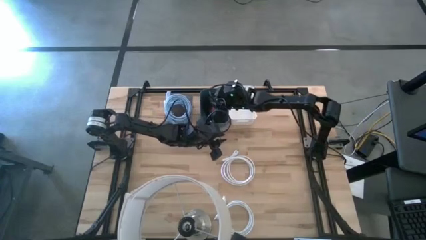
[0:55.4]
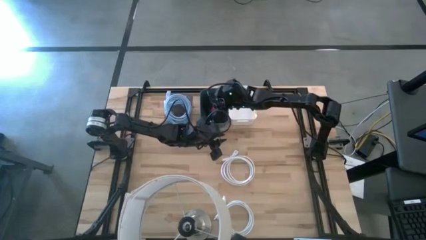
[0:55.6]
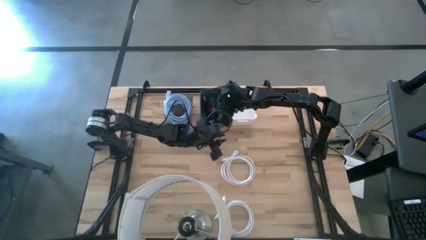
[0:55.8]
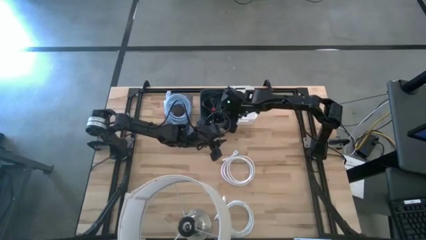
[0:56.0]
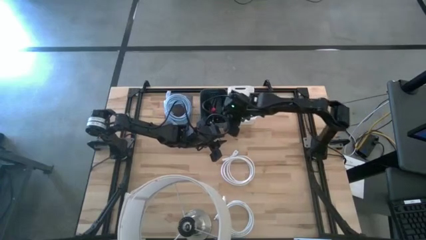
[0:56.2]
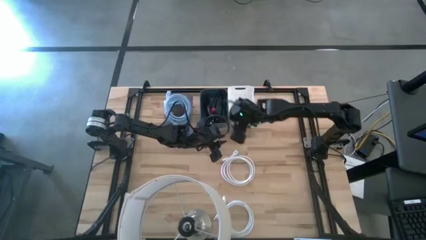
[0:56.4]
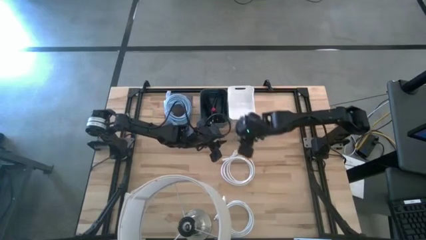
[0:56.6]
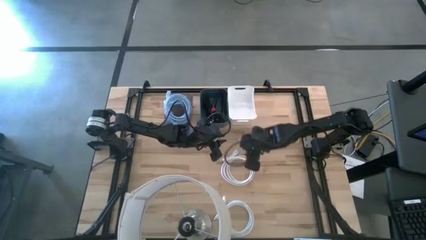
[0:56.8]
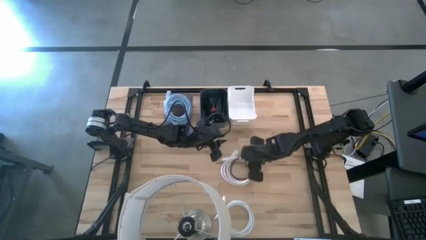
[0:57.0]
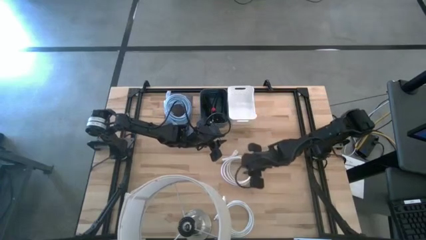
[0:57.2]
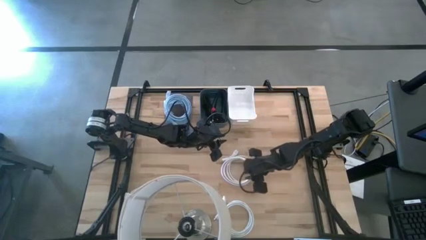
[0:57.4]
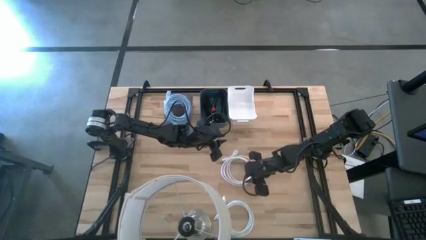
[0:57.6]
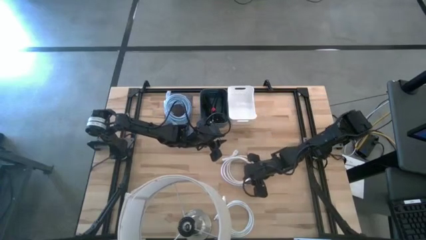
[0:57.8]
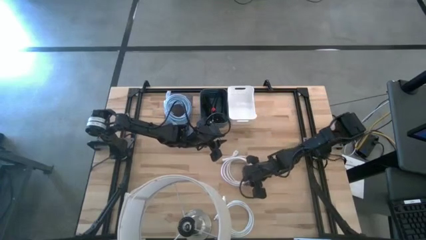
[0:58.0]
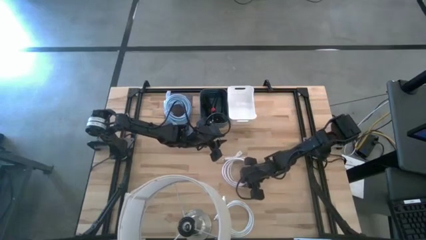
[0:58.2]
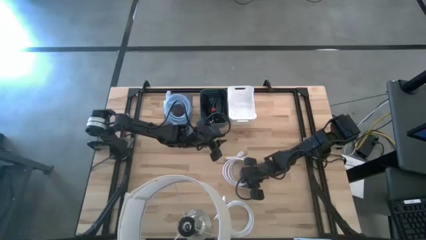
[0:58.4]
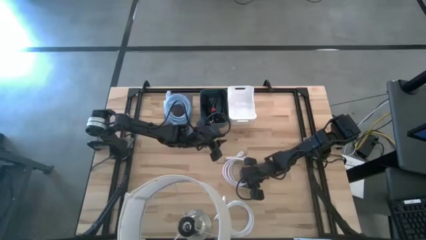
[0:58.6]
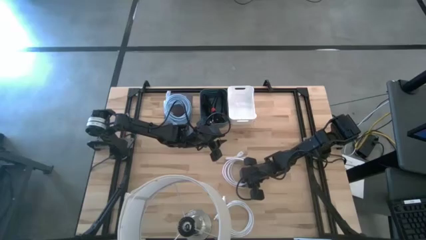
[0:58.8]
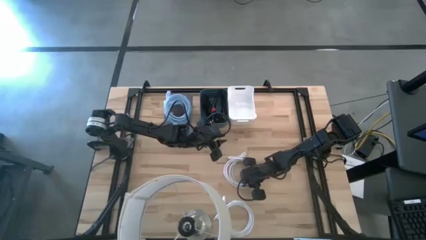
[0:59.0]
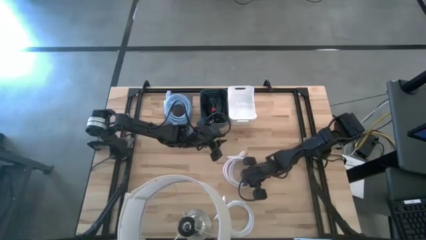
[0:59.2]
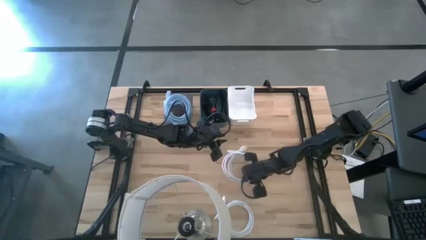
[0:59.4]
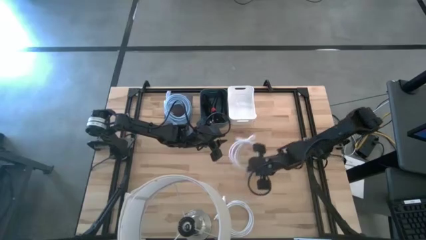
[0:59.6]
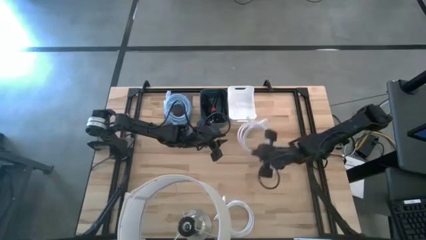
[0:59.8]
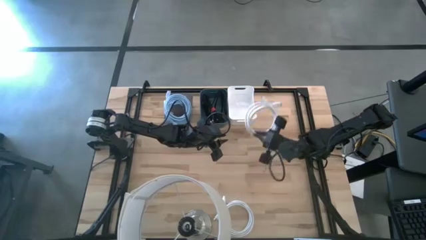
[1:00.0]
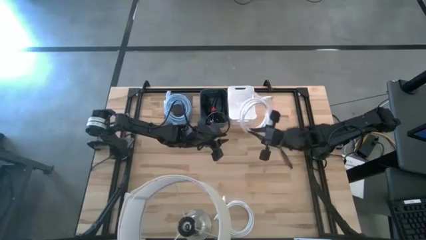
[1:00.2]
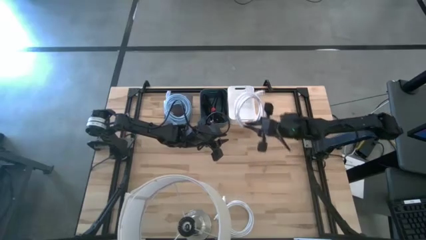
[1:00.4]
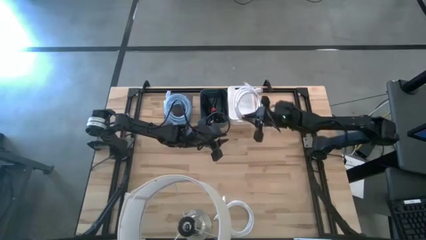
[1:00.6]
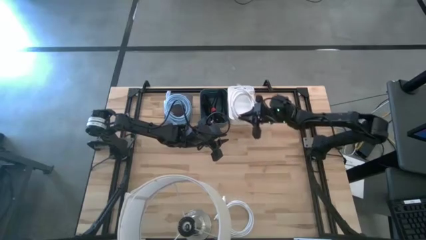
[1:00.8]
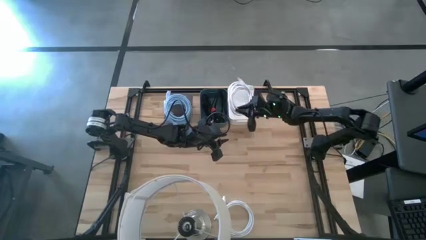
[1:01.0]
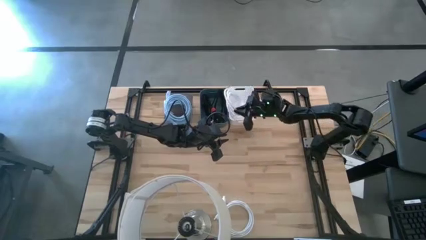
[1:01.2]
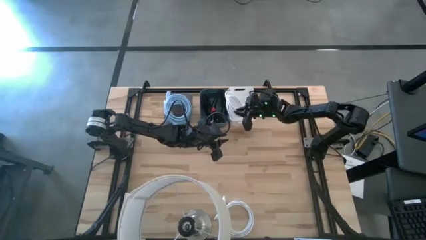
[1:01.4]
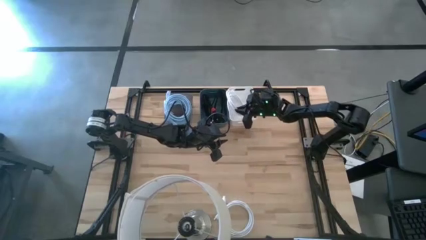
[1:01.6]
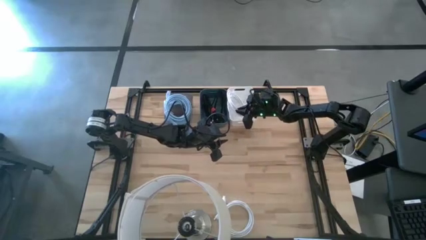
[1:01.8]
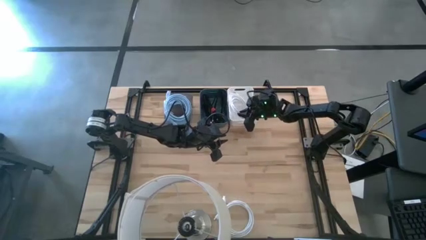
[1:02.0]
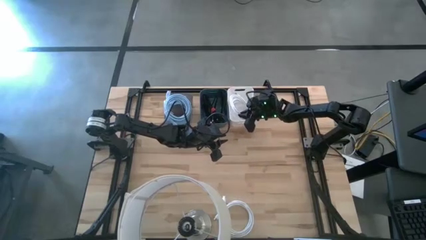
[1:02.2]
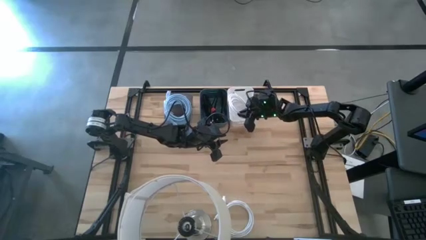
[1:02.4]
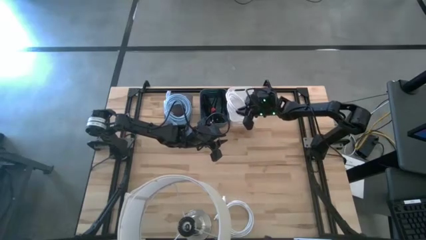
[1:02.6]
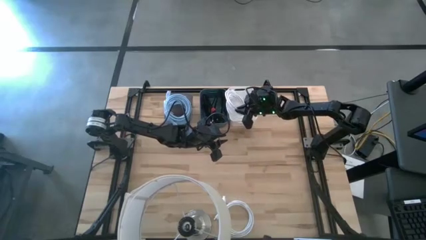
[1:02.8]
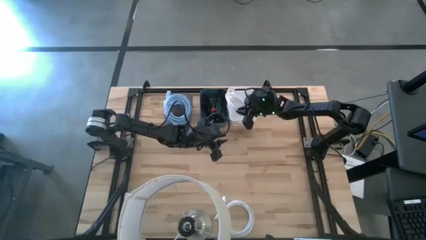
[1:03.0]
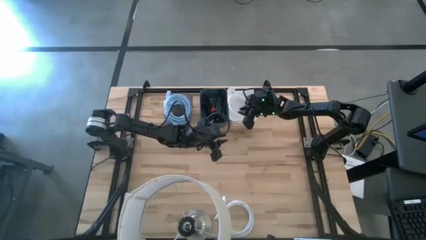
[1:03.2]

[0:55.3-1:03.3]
Task: Sort HDMI cables
Put the top white HDMI cable into the white bin

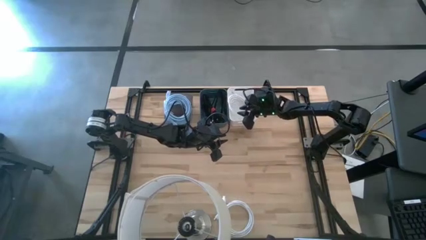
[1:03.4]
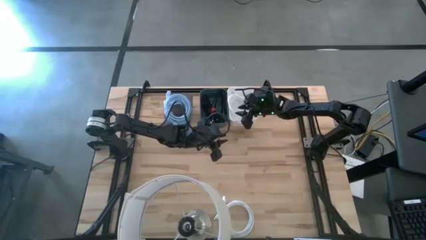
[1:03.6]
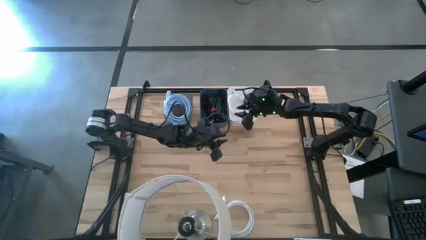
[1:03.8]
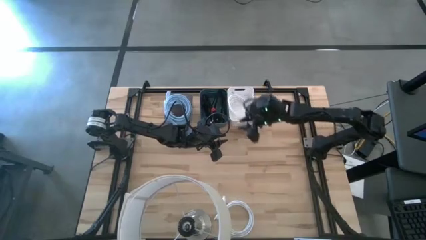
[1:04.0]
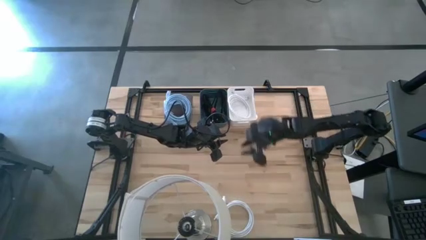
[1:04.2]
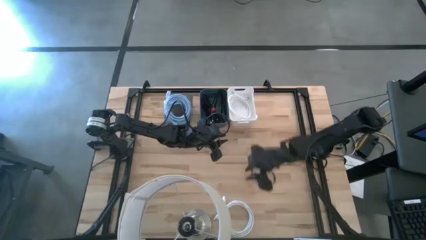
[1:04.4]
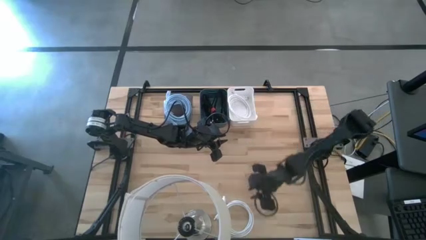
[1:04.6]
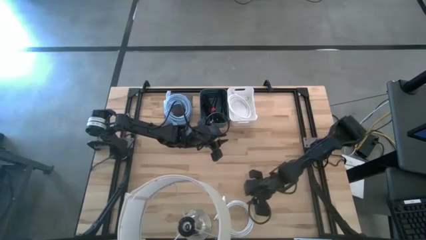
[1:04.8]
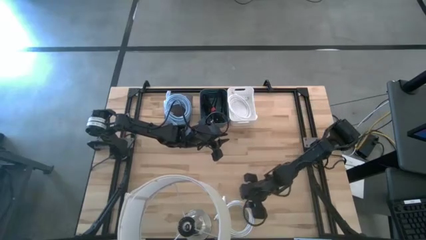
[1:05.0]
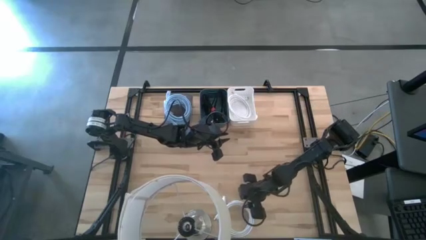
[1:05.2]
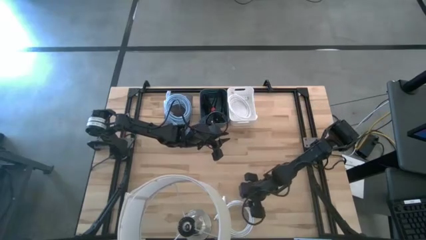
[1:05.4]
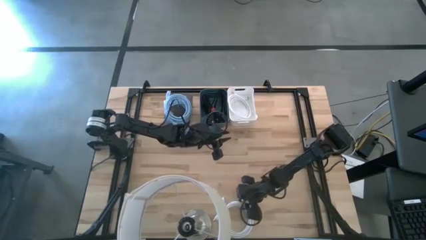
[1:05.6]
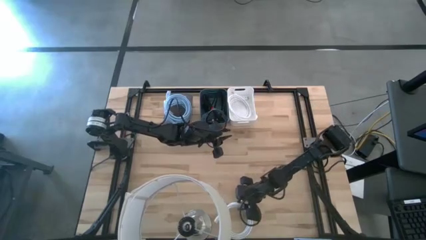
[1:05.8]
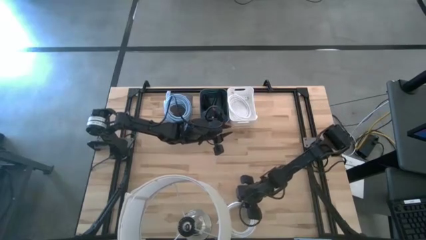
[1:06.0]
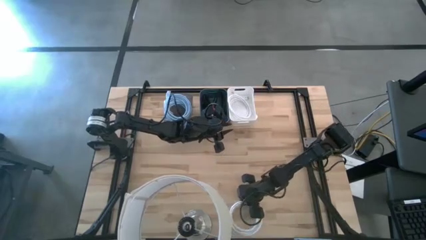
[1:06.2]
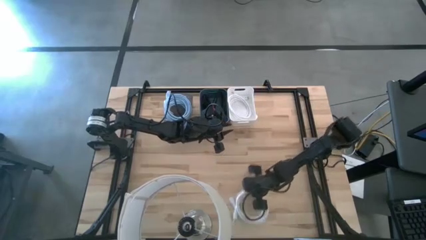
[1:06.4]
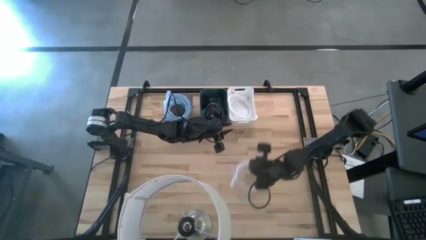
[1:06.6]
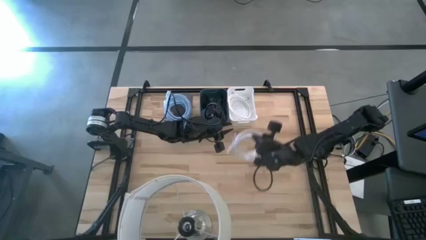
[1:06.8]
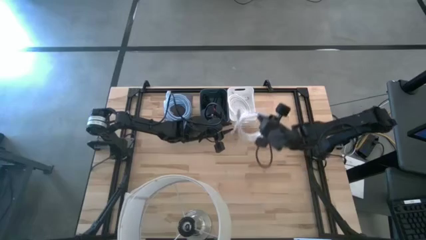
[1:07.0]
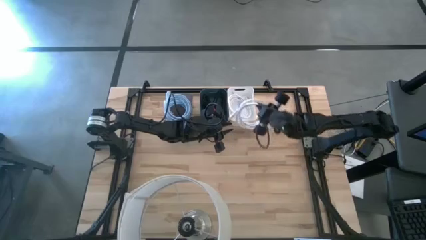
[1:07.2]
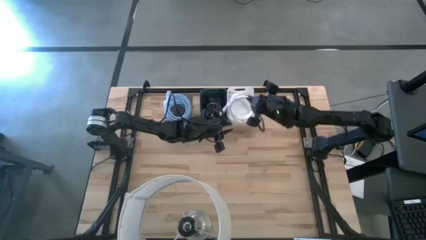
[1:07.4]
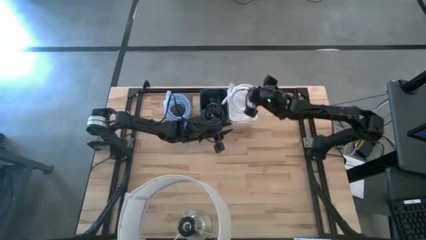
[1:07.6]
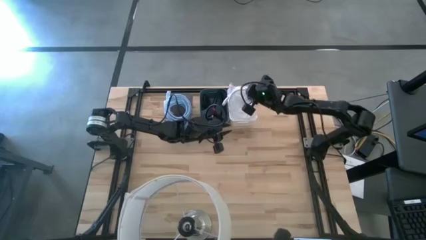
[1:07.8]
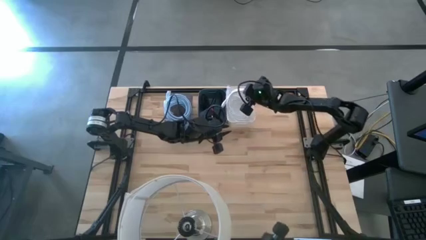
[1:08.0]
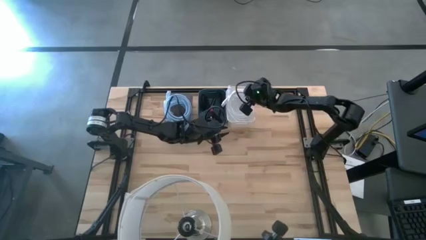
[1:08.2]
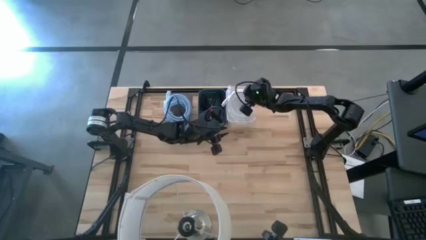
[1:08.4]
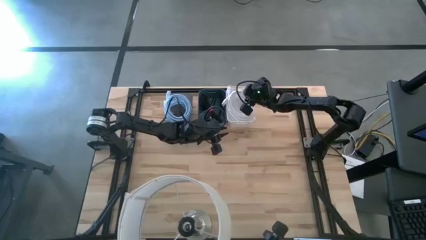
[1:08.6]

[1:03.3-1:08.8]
Put the white HDMI cable into the white bin

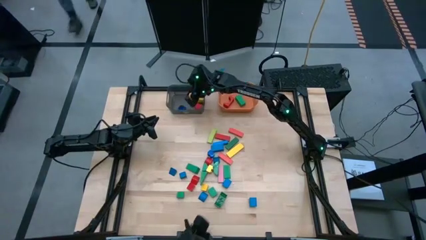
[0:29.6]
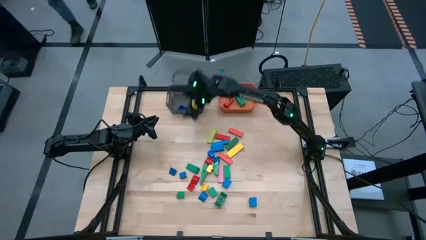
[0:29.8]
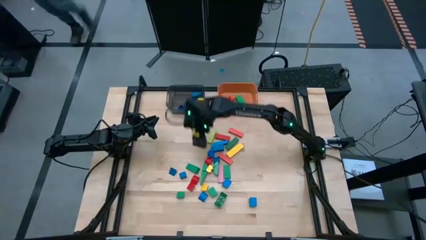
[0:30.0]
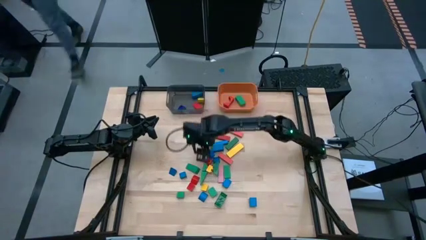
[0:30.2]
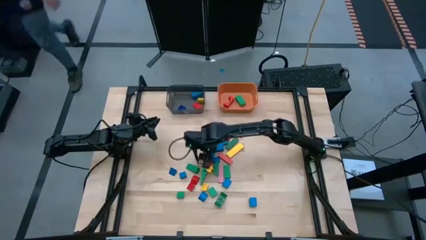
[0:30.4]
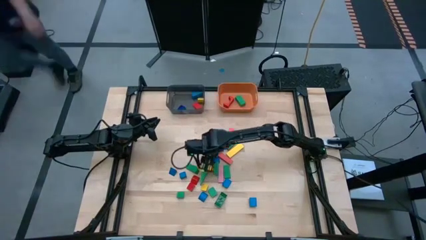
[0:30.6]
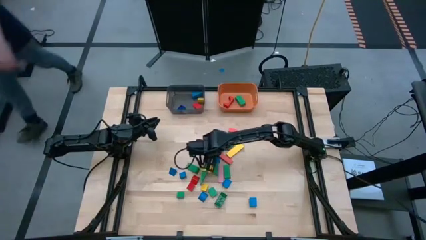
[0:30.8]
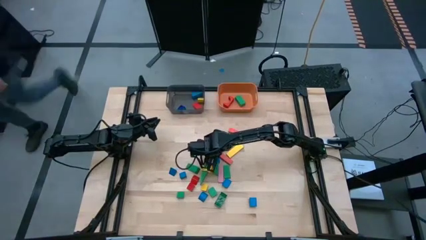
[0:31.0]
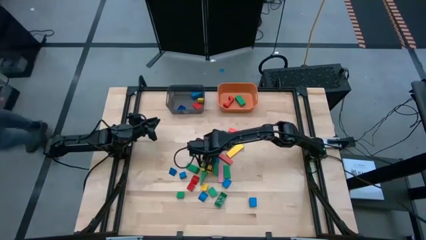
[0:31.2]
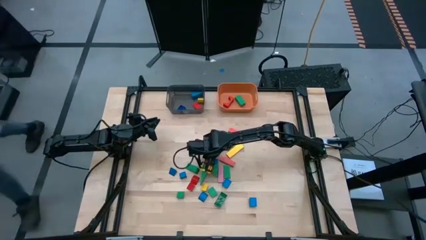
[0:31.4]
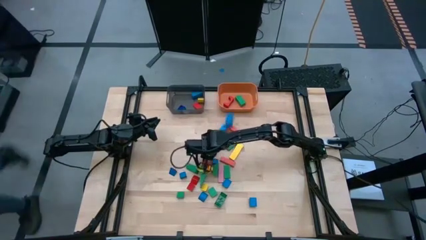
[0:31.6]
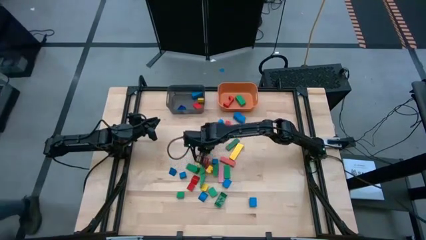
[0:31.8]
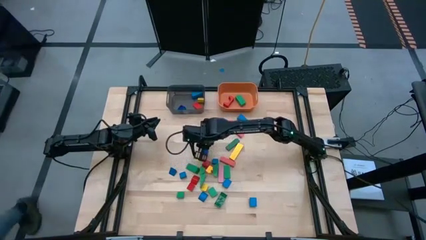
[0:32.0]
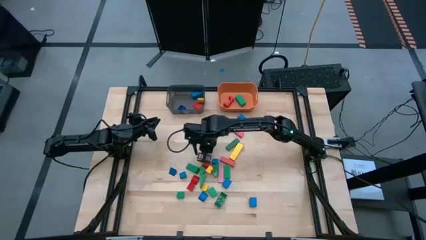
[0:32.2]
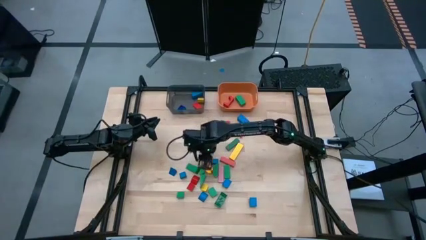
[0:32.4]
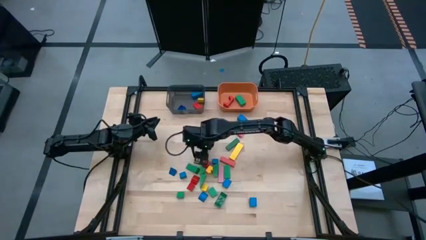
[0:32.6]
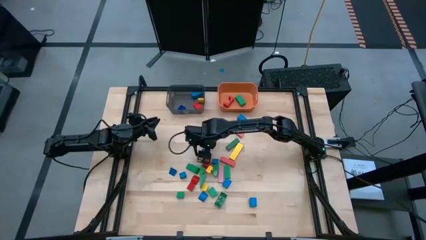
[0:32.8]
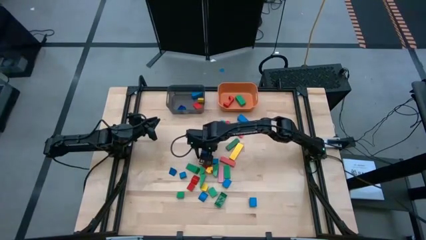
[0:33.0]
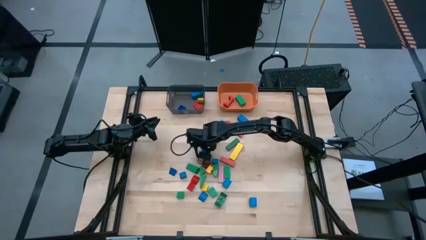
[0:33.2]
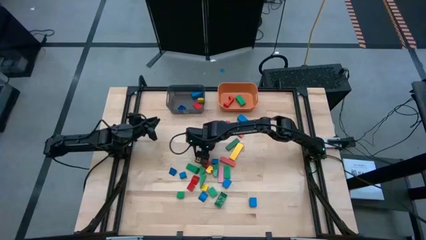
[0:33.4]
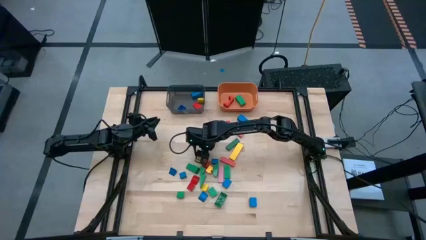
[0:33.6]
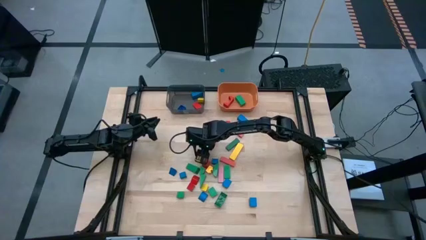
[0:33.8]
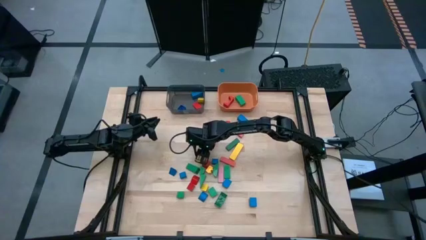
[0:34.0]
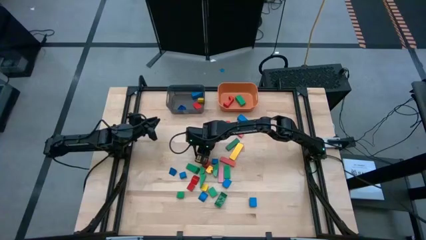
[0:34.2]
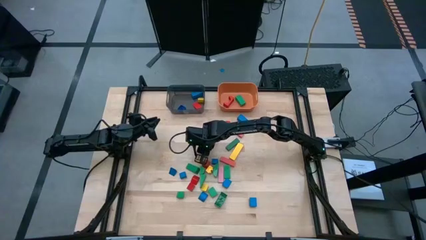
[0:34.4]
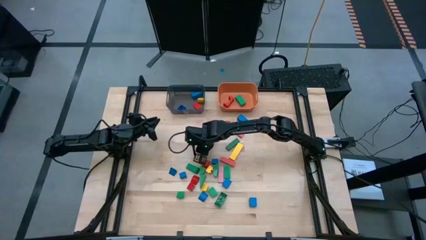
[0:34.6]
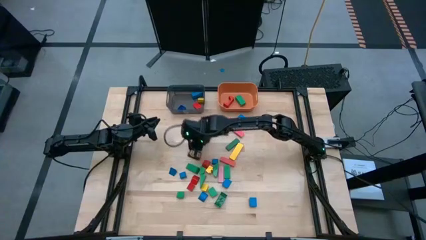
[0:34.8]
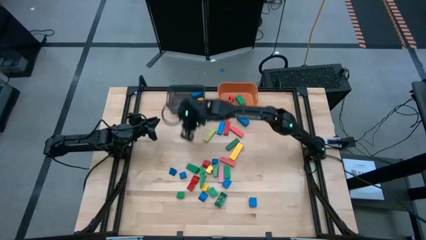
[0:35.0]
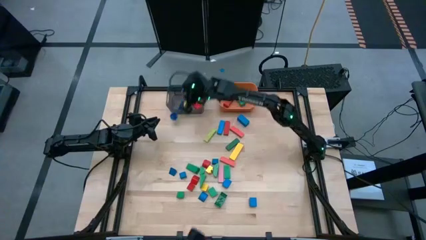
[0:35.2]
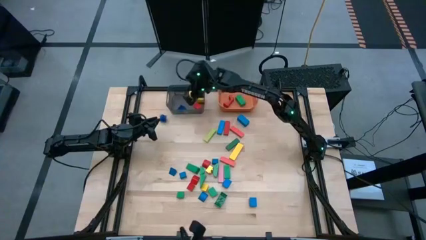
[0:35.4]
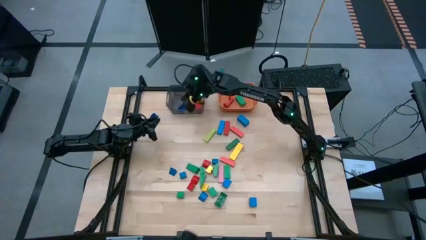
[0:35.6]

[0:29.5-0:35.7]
Task: Sort blocks by size
Put the small blue game piece into the black bin
